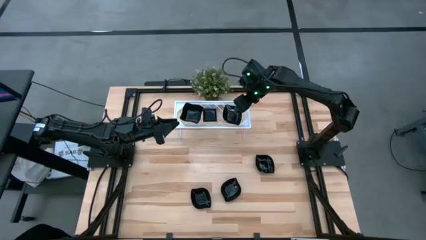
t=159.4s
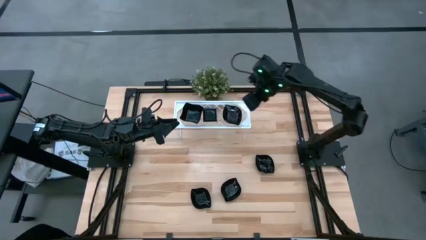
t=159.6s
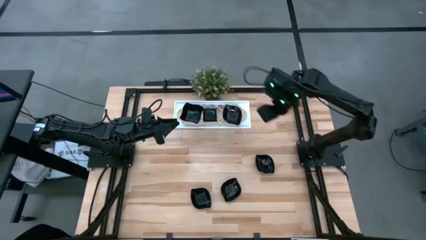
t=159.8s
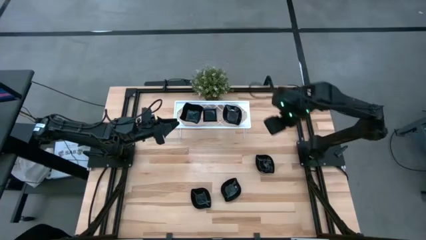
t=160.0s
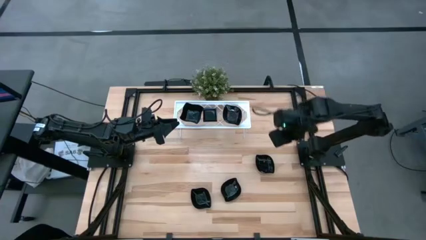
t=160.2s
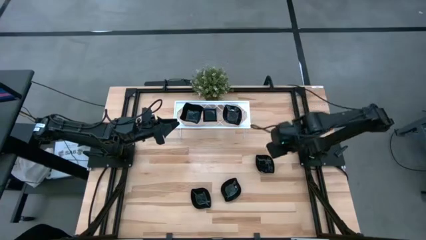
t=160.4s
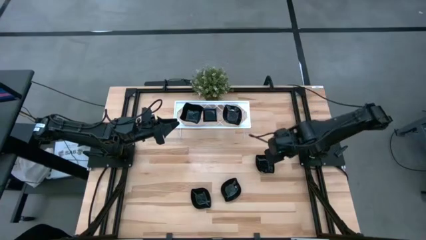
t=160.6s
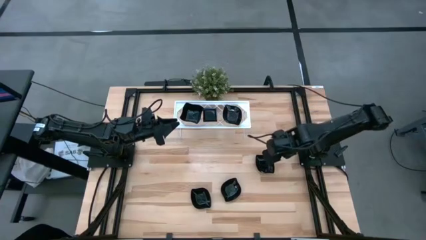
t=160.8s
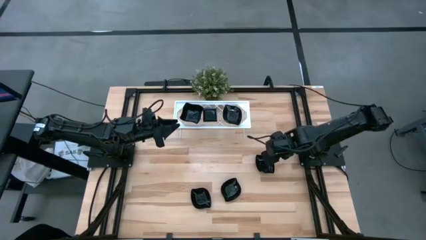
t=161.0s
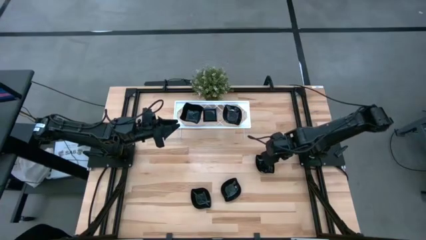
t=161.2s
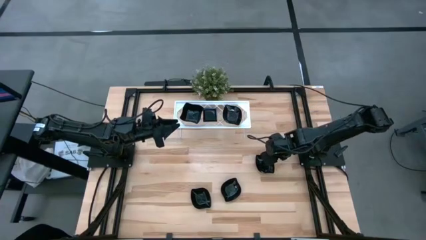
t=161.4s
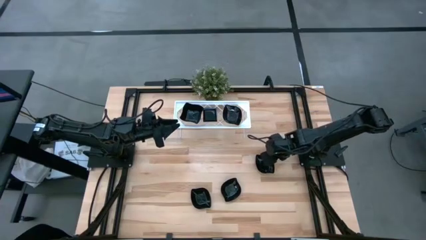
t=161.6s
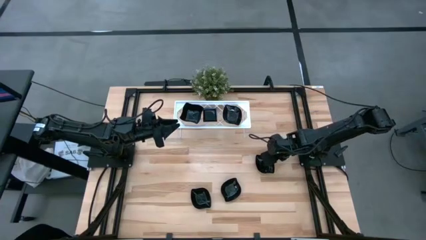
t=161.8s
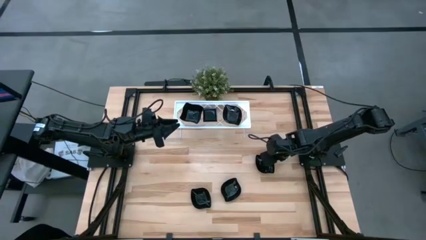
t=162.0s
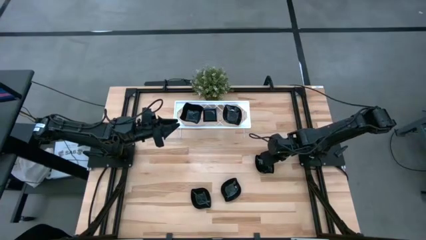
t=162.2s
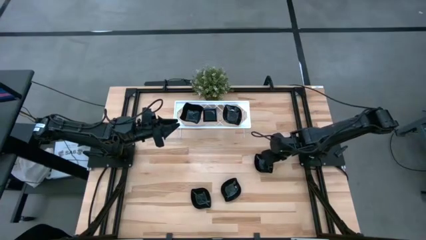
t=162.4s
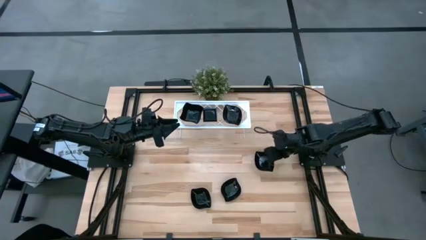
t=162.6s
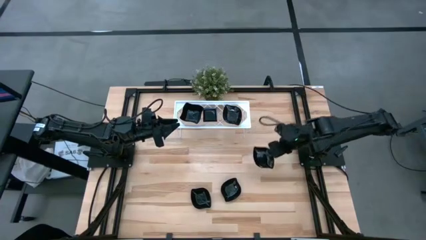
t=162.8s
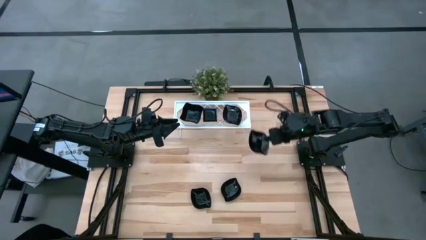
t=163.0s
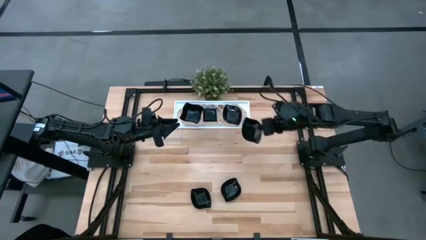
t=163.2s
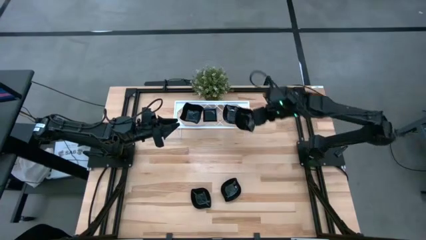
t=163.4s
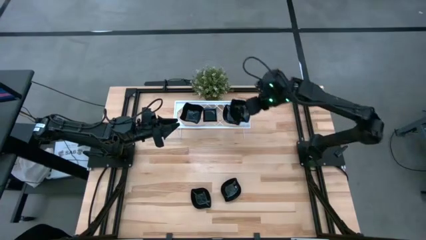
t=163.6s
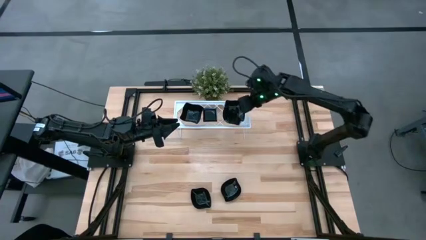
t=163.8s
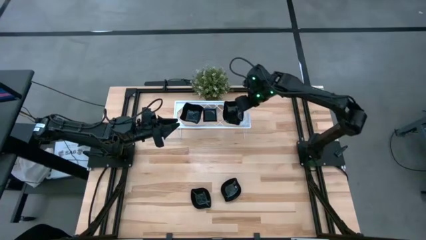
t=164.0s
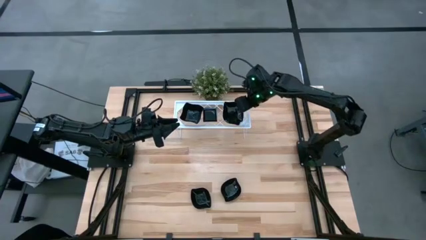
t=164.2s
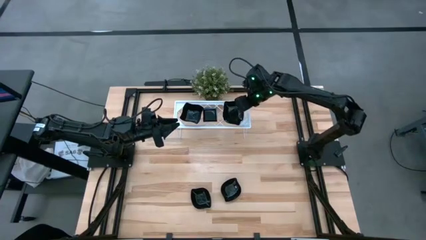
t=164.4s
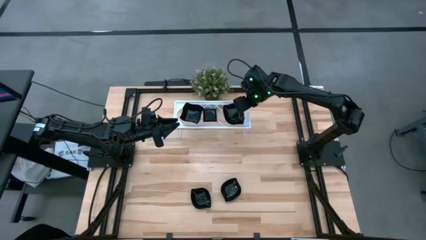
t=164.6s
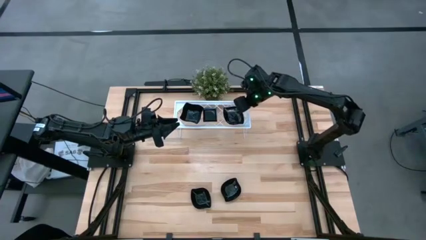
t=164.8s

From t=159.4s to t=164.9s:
Task: Pick & Place Mini shaped plates
Stack the top right leaf shaped plate on top of the stacked leaf shaped plate on the shelf

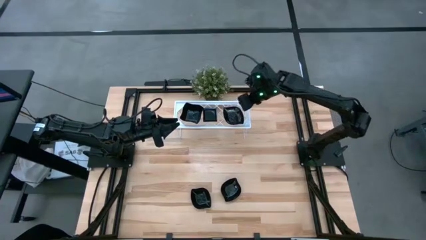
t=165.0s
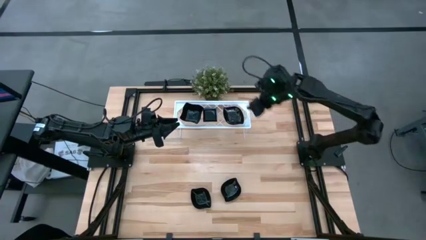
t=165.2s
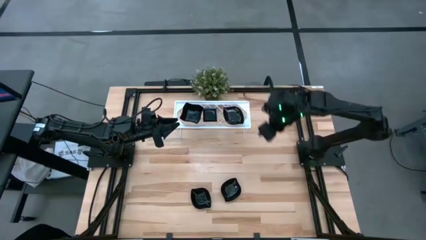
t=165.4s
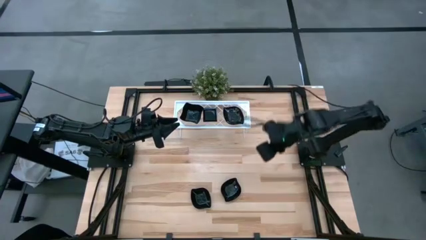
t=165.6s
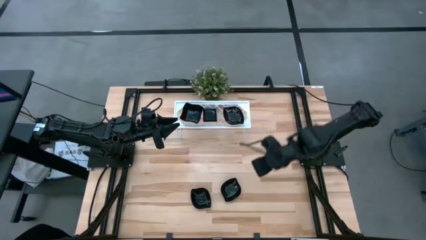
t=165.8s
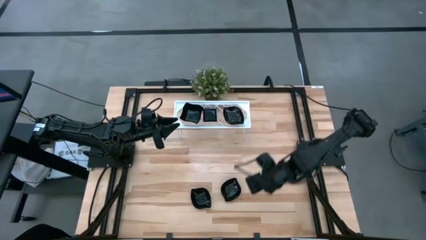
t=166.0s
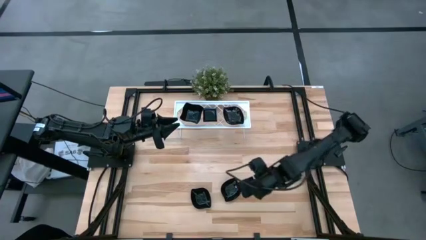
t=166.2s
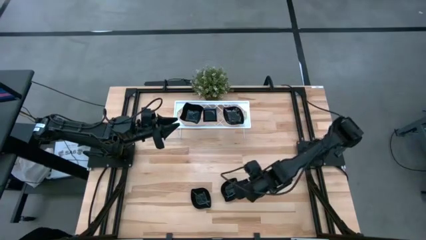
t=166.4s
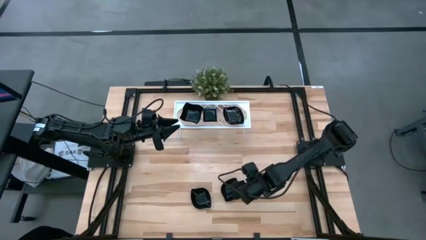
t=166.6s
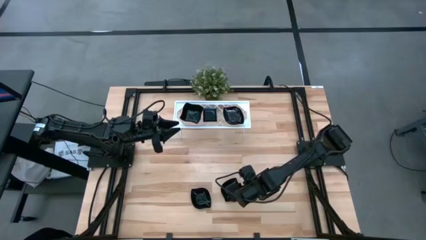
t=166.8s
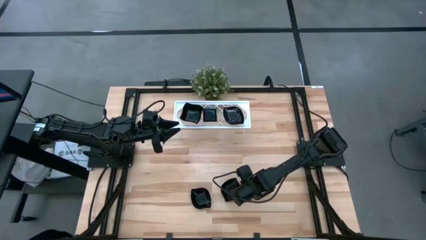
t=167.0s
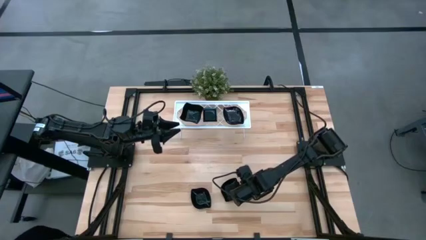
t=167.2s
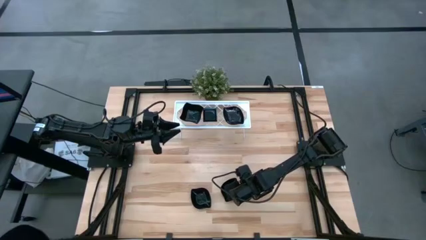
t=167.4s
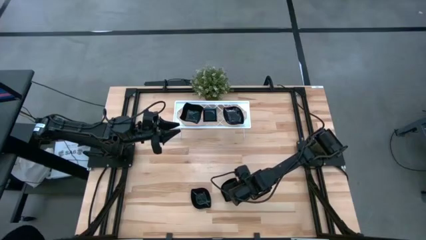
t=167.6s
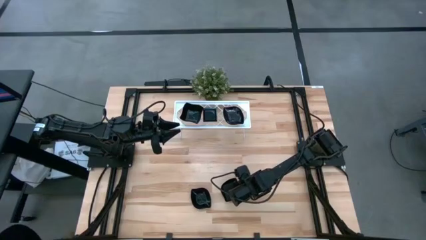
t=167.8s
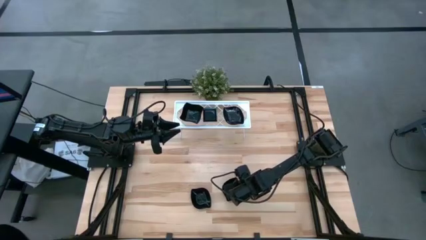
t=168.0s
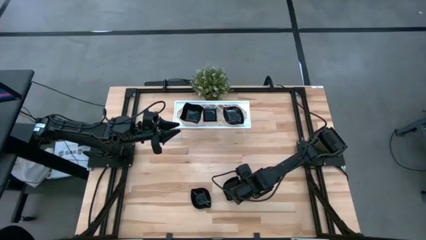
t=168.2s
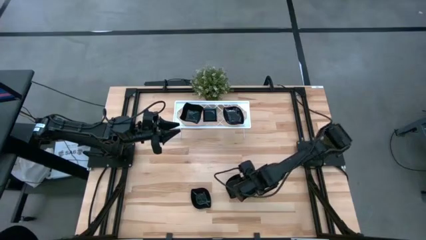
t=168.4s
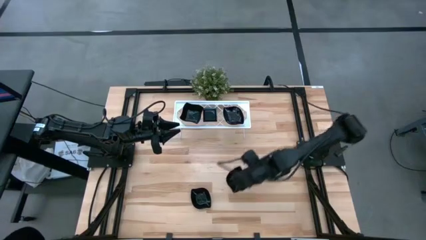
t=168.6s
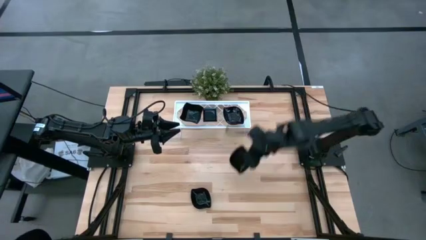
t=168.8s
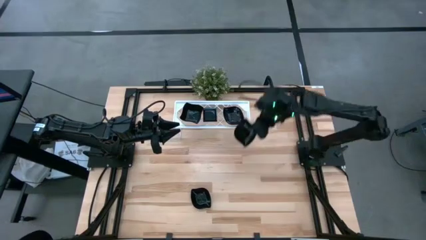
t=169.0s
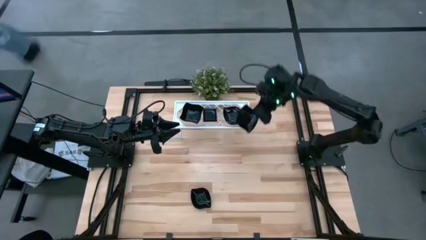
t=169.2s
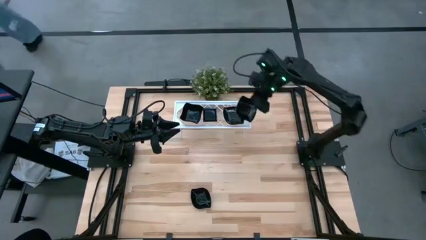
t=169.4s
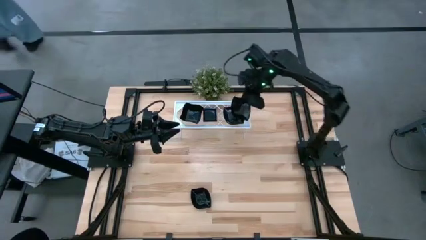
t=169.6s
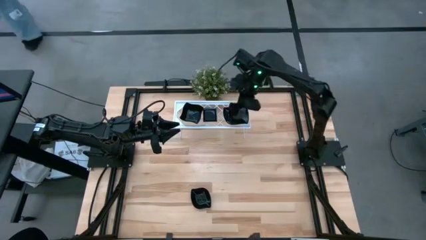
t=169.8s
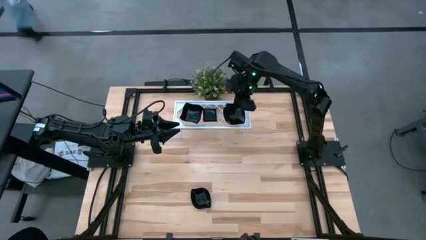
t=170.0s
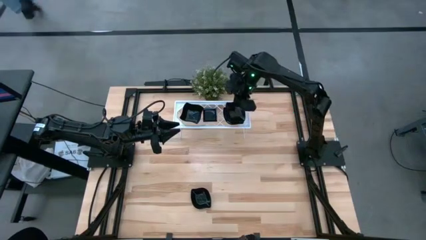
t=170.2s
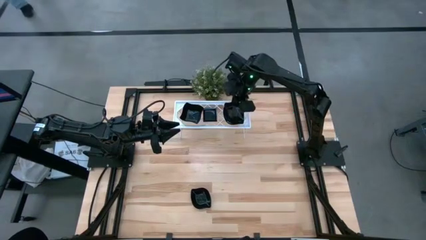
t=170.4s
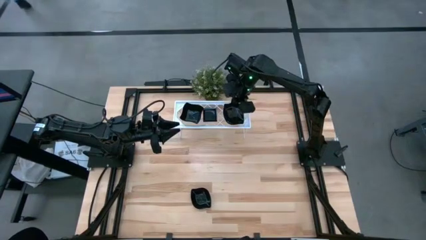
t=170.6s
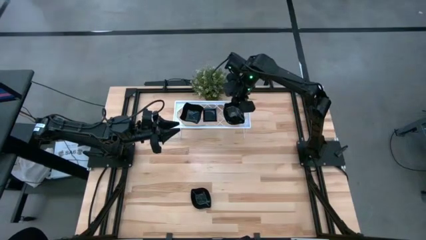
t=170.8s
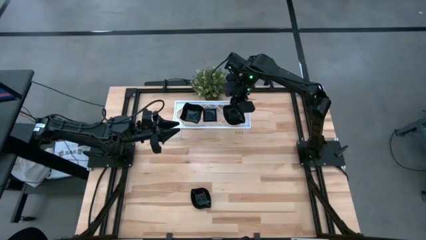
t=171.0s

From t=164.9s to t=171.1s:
Stack the right leaf shaped plate on top of the stacked leaf shaped plate on the shelf

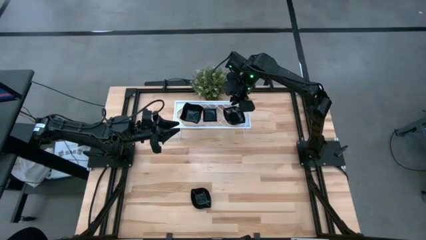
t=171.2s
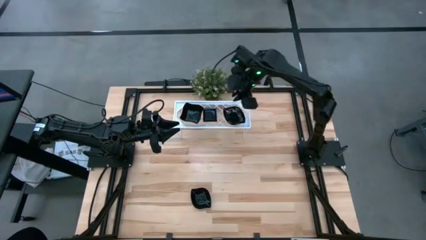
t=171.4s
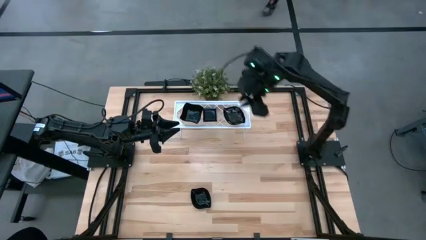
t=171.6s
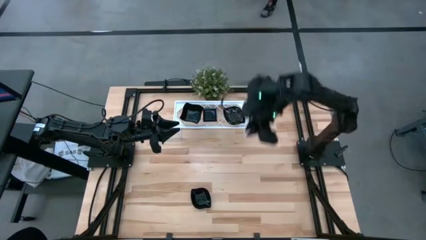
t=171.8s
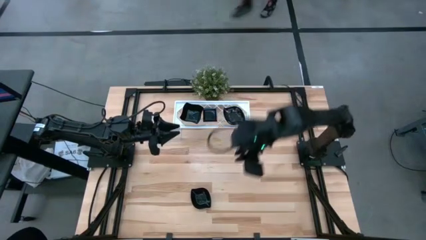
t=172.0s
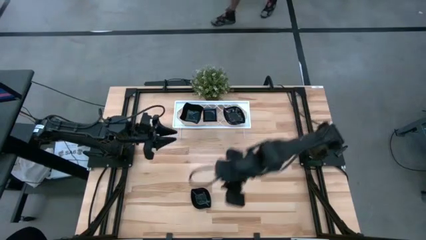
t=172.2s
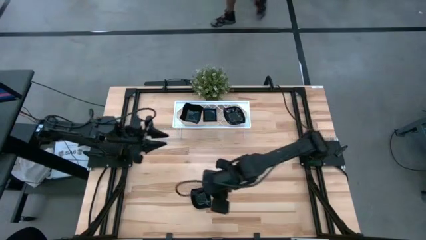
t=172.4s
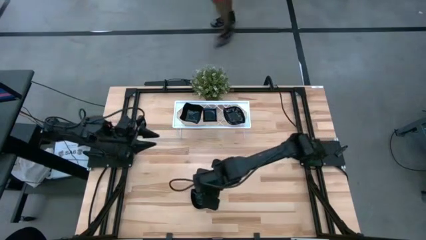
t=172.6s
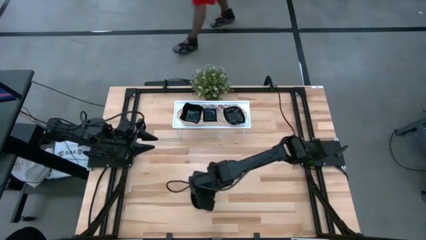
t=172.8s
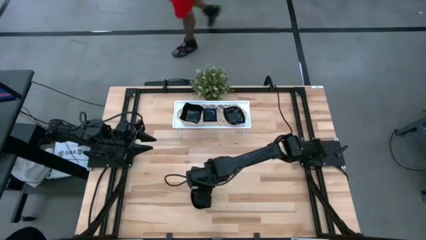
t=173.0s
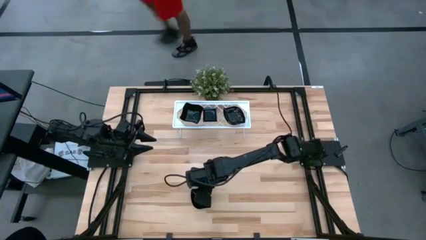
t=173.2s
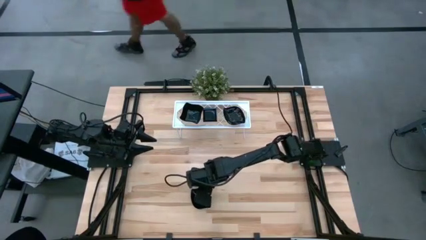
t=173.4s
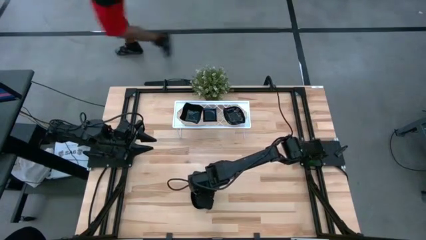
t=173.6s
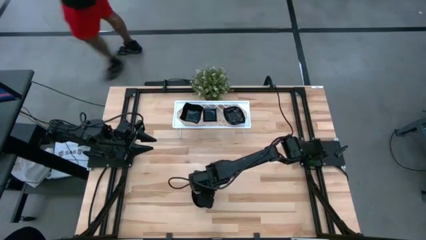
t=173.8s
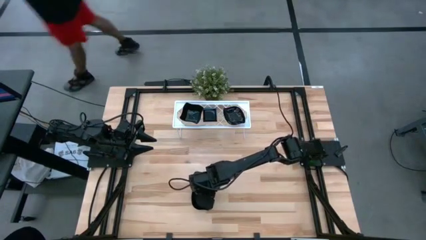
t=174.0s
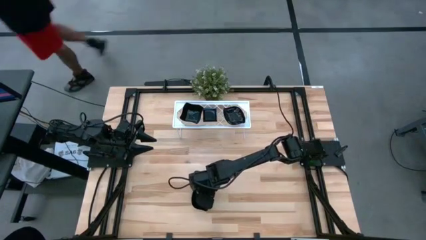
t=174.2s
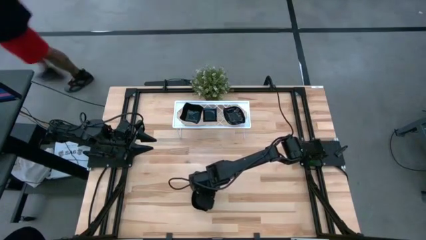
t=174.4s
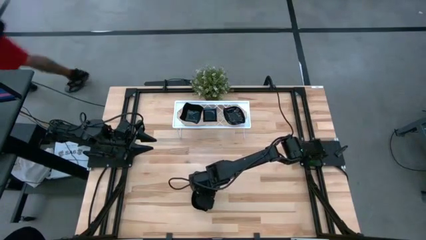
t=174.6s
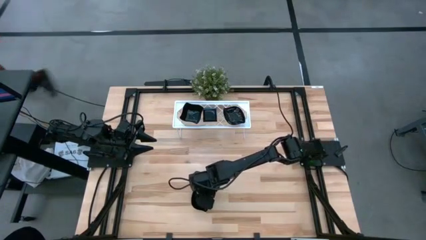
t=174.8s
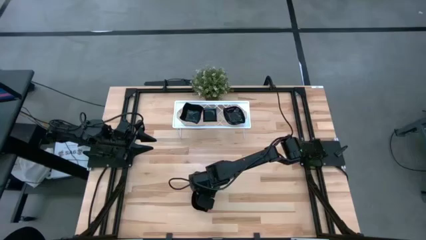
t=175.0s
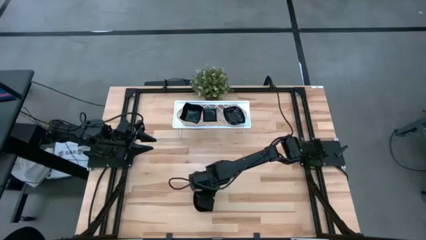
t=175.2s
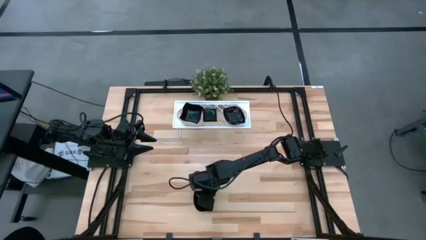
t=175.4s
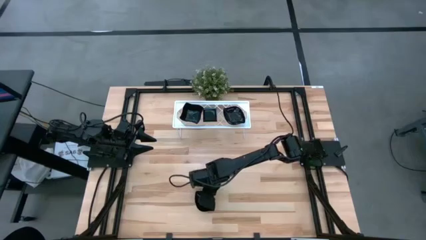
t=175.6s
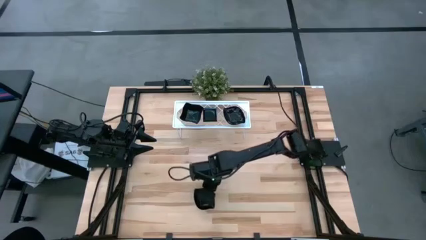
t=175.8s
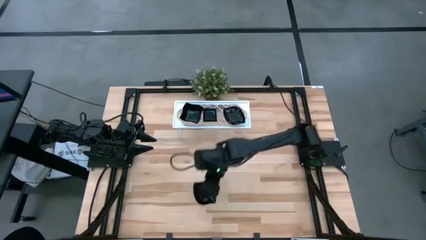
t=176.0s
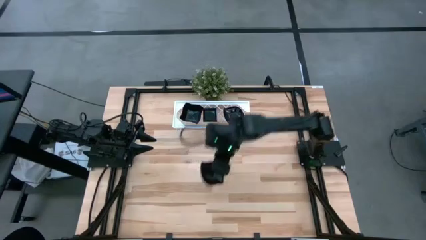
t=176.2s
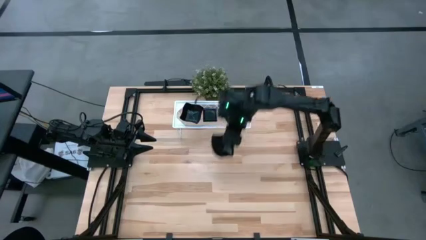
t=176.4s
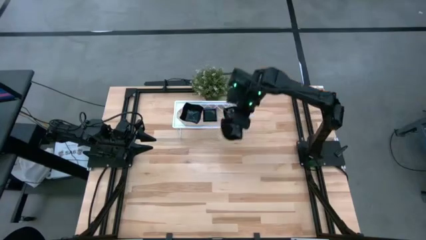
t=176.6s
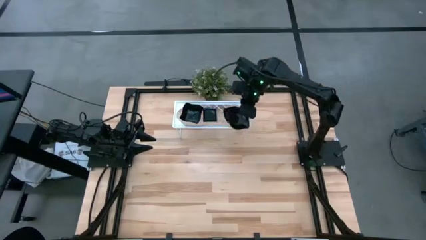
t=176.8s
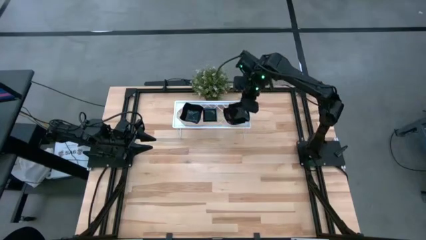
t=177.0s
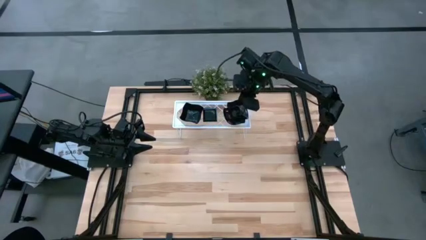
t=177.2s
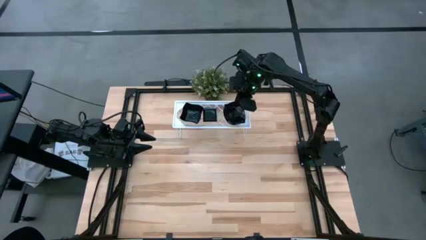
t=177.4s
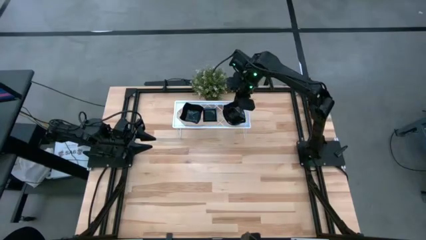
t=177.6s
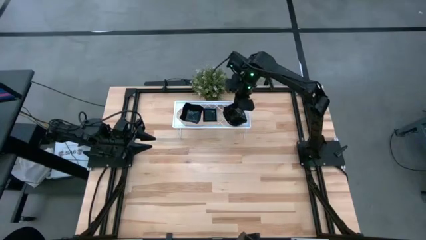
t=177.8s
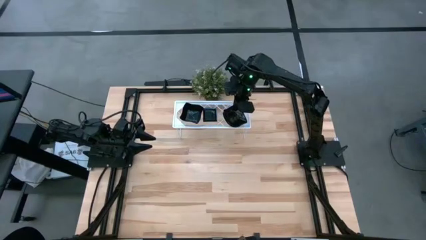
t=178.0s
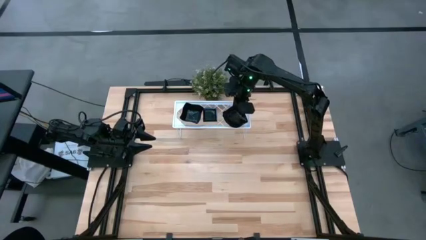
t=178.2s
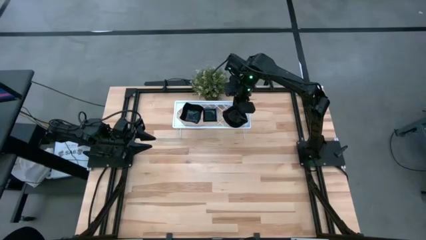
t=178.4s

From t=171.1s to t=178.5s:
Stack the leaf shaped plate on top of the stacked leaf shaped plate on the shelf
